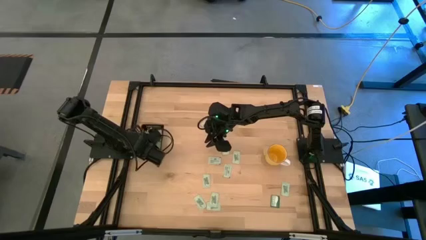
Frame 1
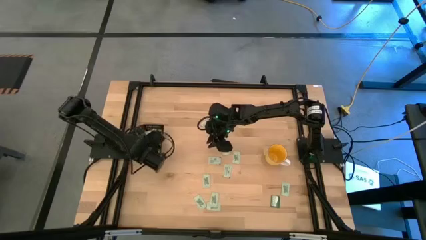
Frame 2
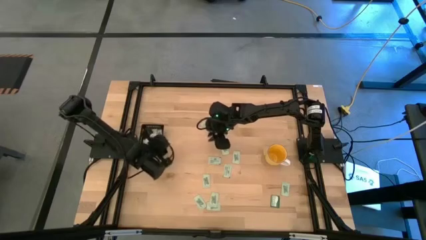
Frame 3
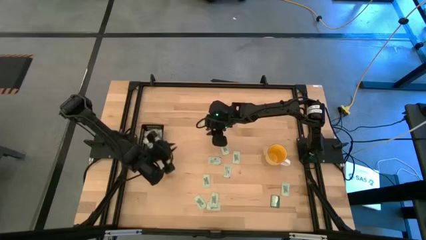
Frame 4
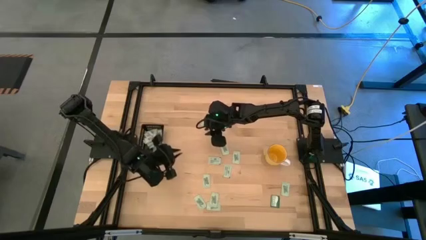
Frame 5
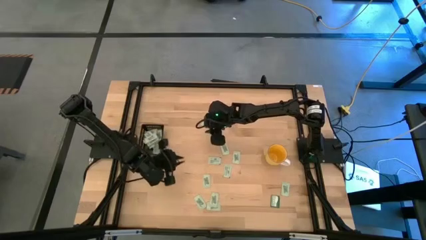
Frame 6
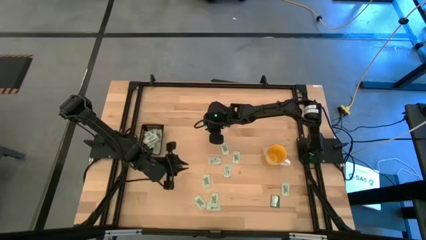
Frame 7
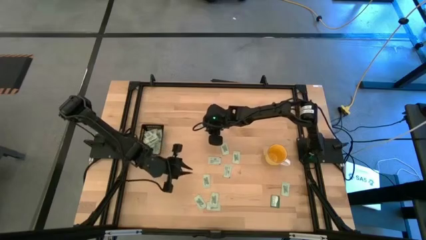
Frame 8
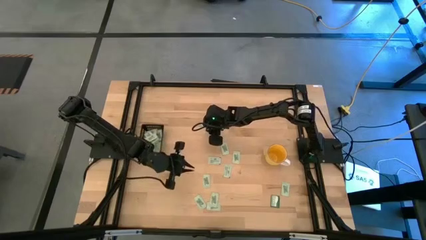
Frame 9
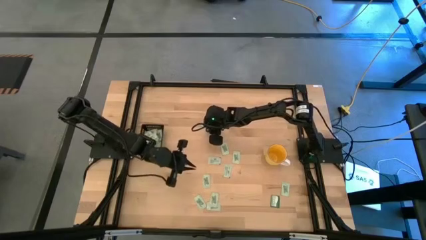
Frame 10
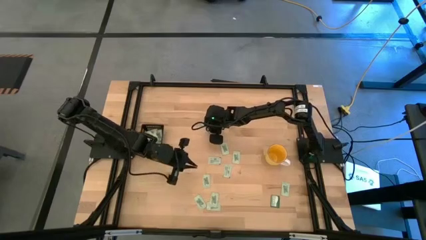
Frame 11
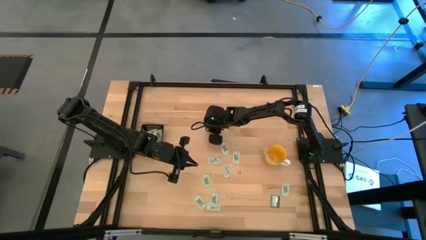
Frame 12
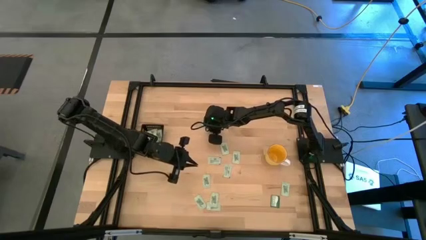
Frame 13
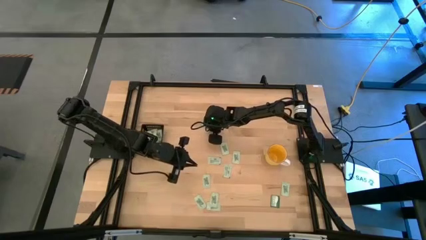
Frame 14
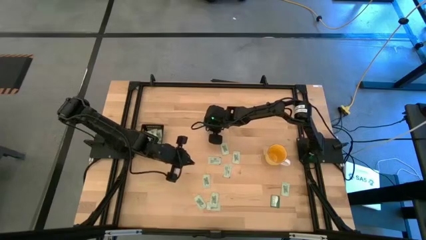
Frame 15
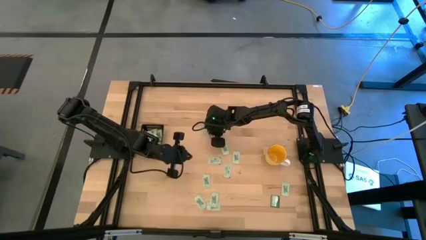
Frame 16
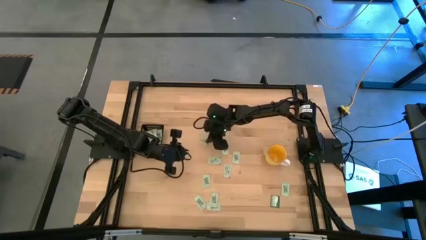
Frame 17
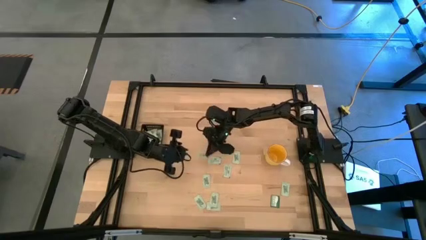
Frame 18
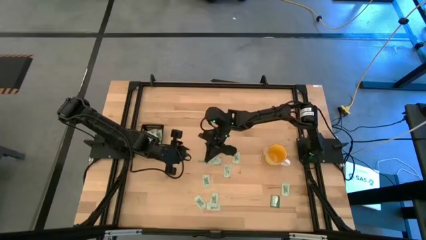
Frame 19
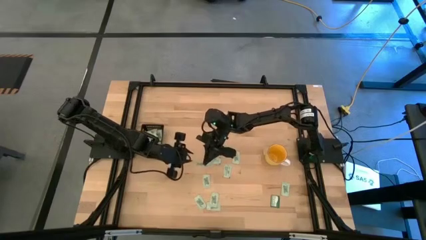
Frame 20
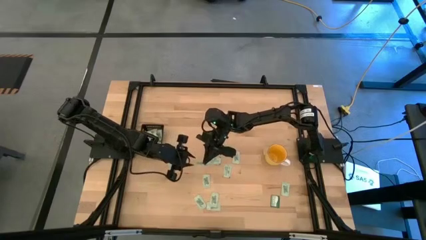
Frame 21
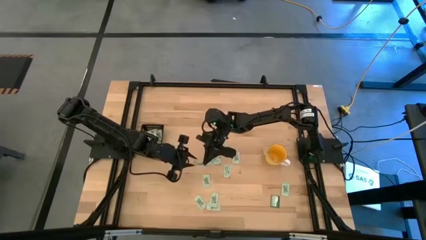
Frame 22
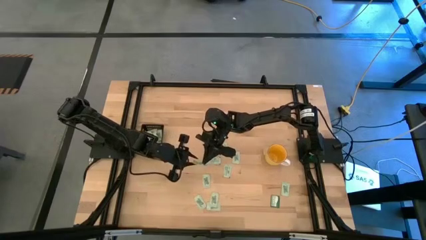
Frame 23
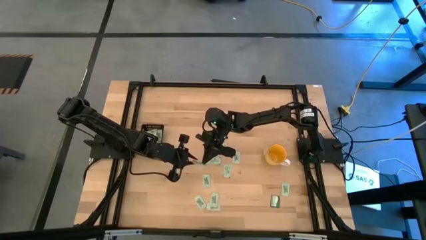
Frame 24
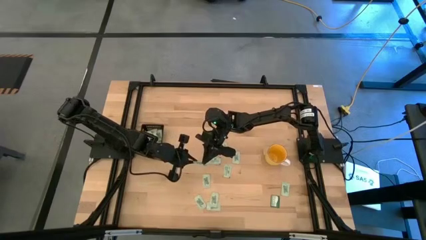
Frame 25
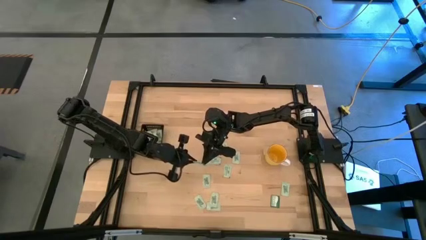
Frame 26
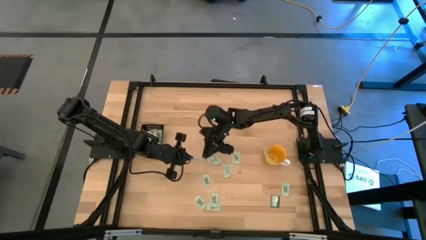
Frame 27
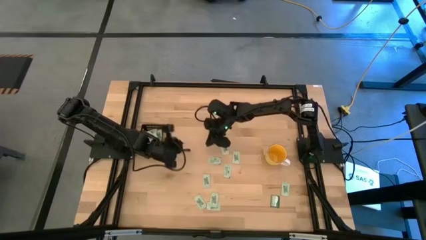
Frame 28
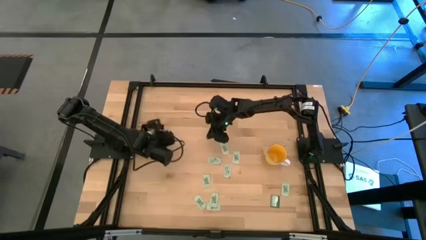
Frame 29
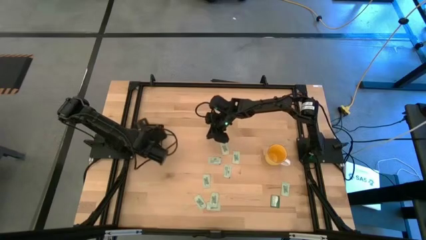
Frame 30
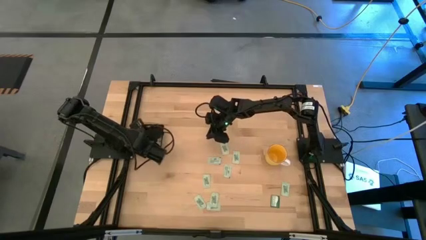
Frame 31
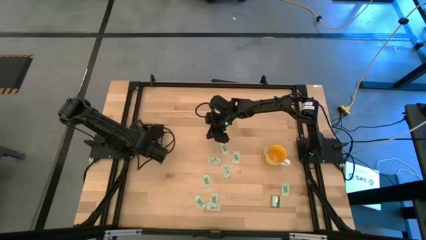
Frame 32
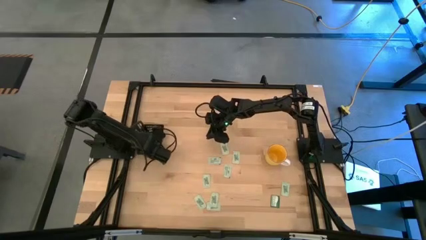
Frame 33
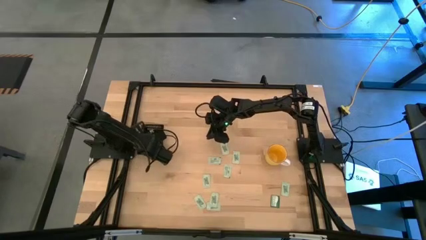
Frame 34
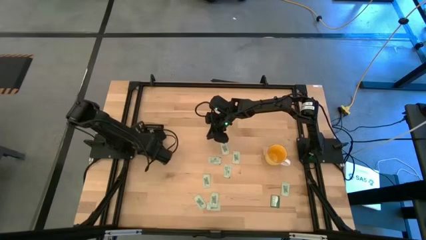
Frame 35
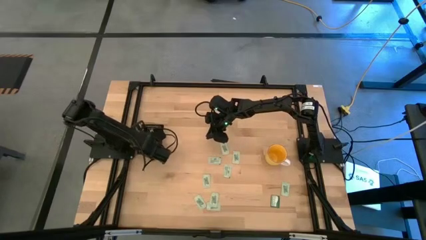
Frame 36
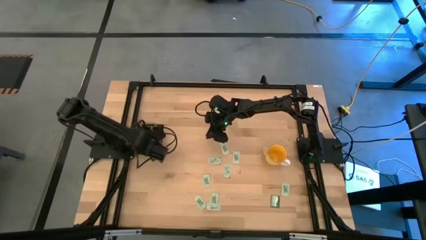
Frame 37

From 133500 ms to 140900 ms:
Task: Pick and place Stevia / Truvia into bins
Put the stevia packet into the black bin

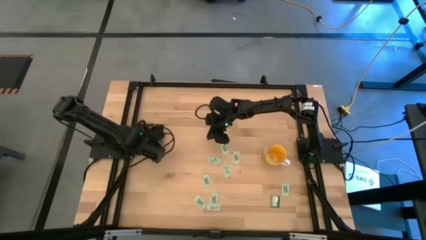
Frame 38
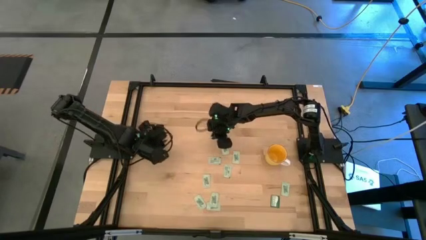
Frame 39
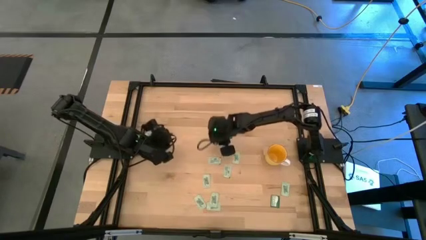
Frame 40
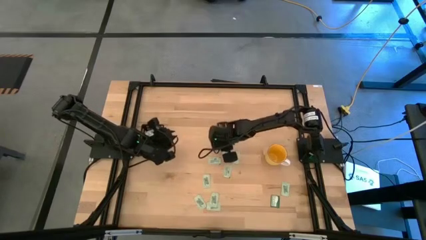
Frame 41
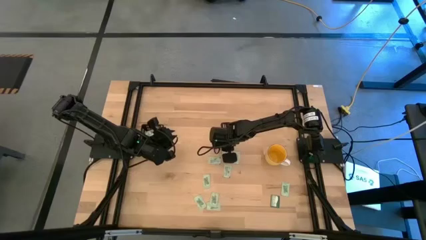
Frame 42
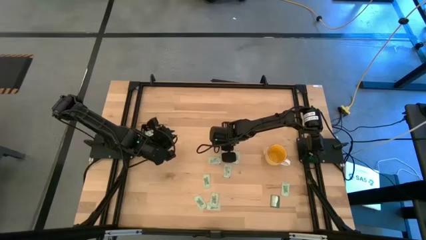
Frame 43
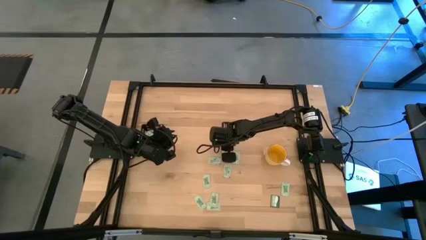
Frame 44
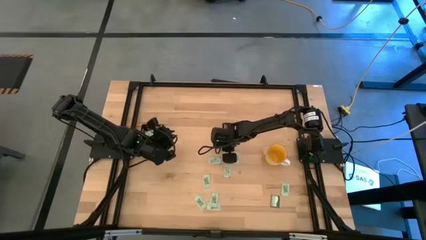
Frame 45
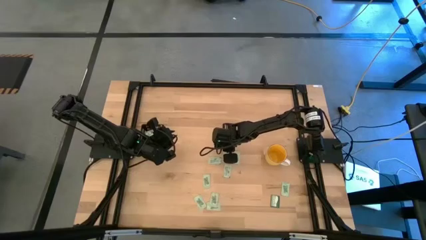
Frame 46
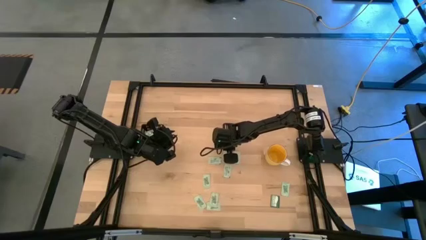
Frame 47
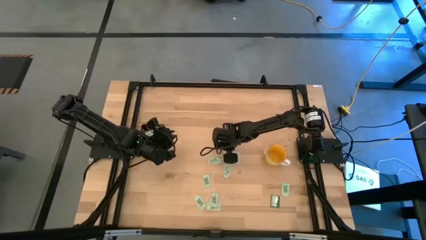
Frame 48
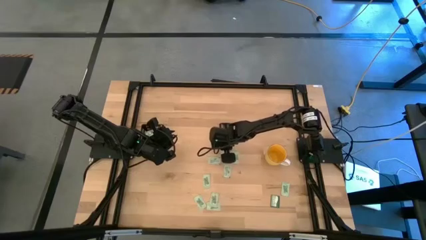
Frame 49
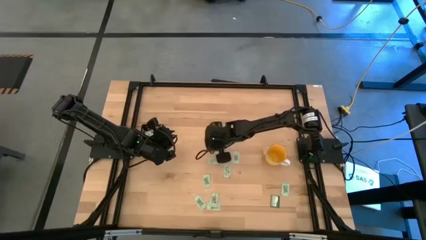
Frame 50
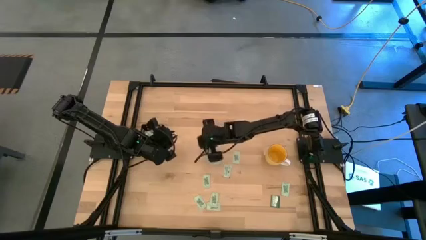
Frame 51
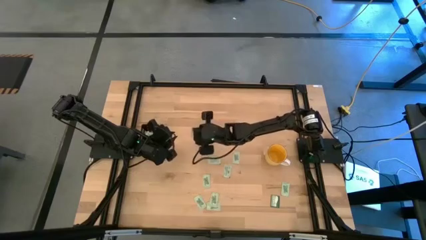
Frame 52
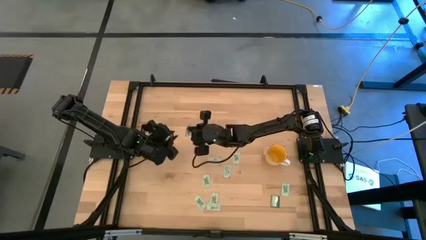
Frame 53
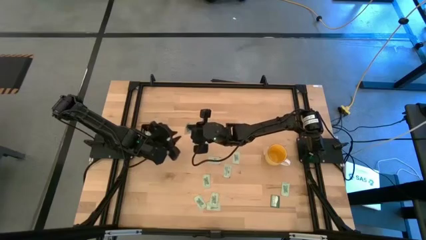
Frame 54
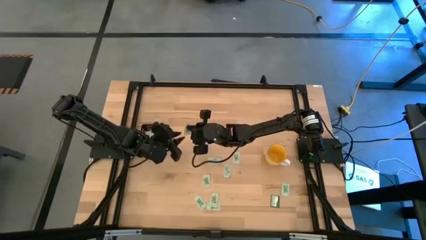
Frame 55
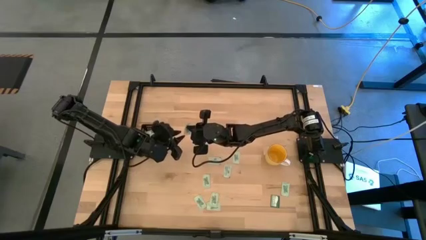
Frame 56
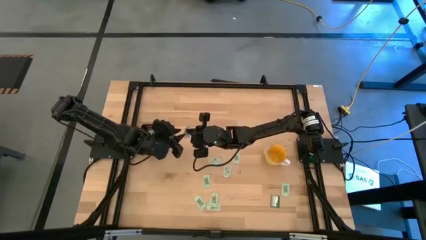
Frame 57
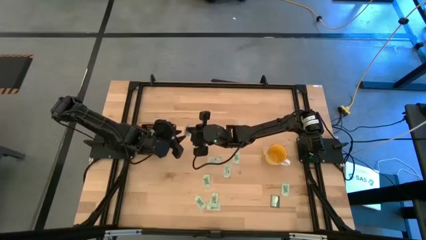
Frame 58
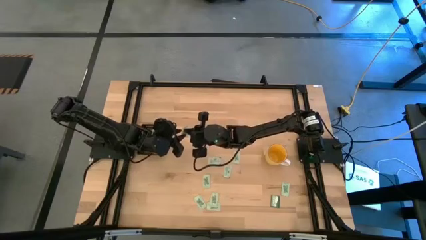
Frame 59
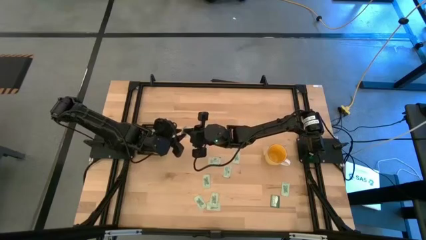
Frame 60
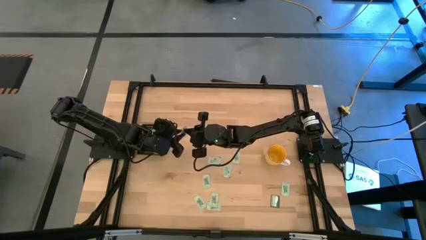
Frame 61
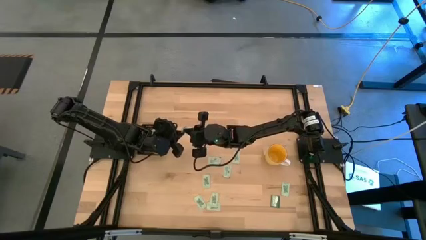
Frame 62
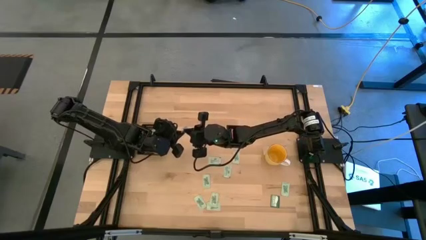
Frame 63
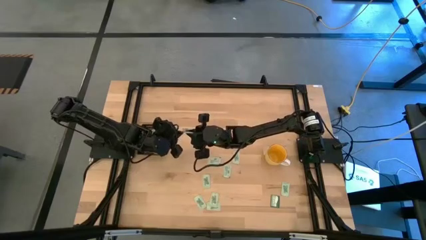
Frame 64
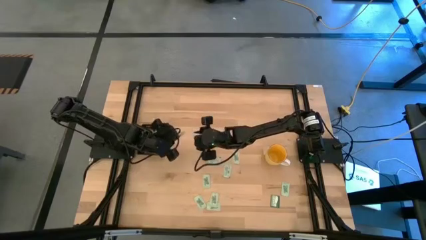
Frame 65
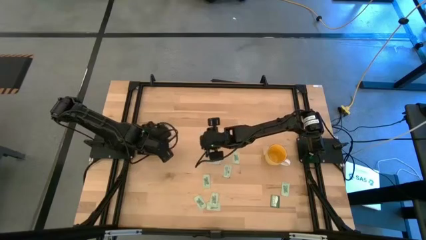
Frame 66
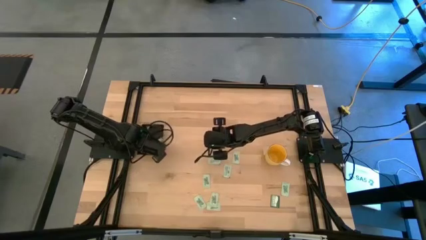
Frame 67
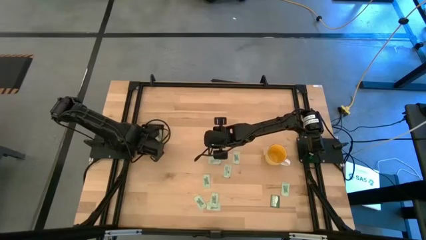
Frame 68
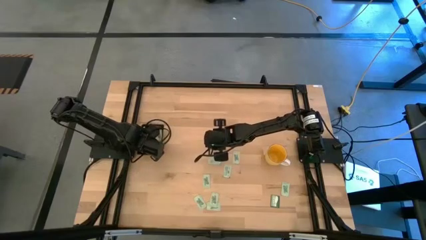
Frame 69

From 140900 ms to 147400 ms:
Put the stevia packet into the black bin
